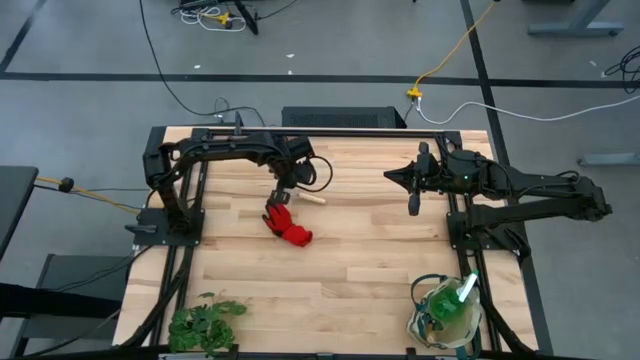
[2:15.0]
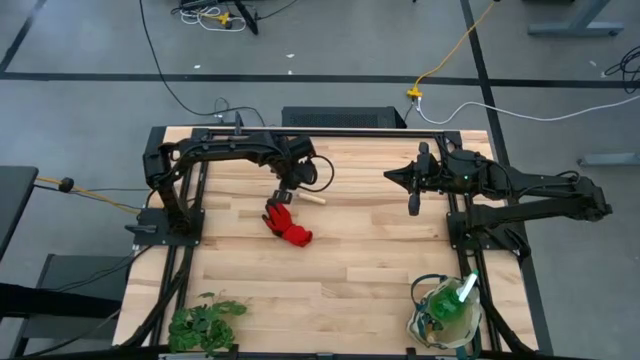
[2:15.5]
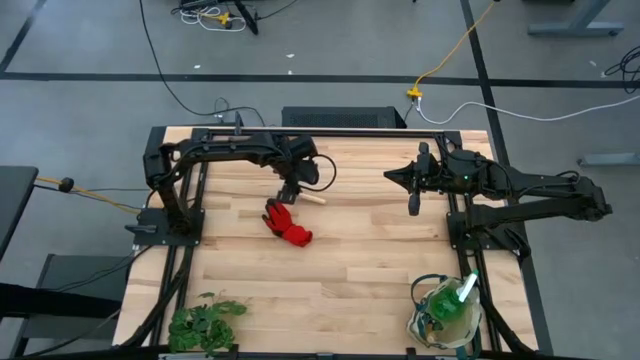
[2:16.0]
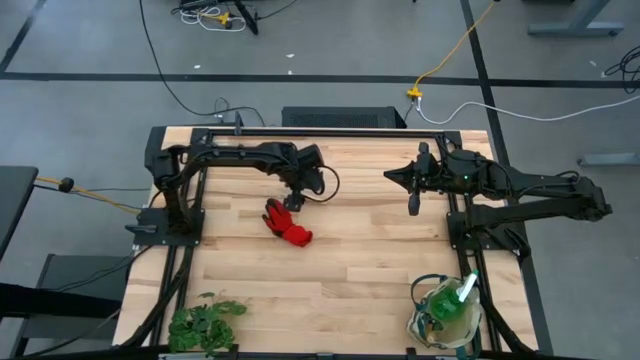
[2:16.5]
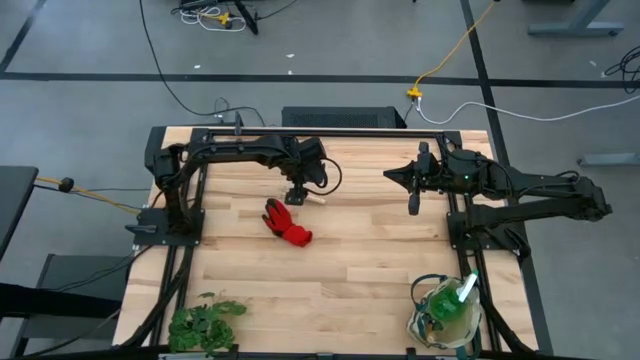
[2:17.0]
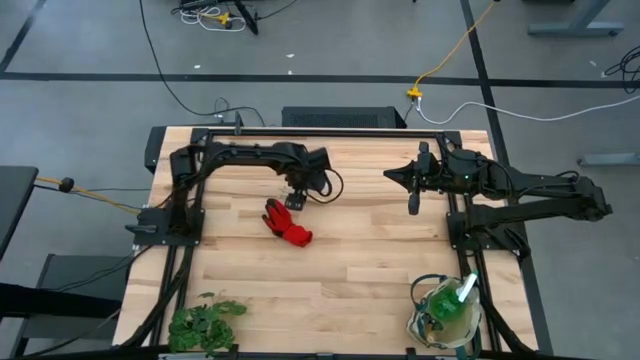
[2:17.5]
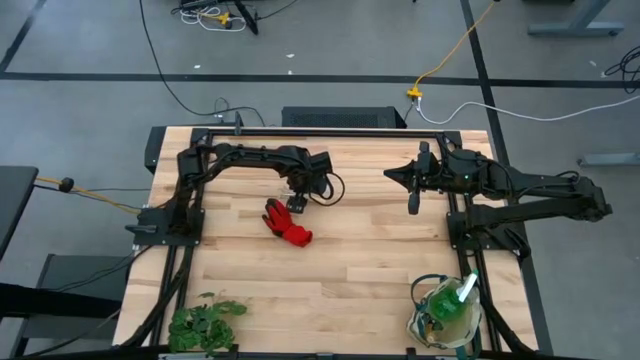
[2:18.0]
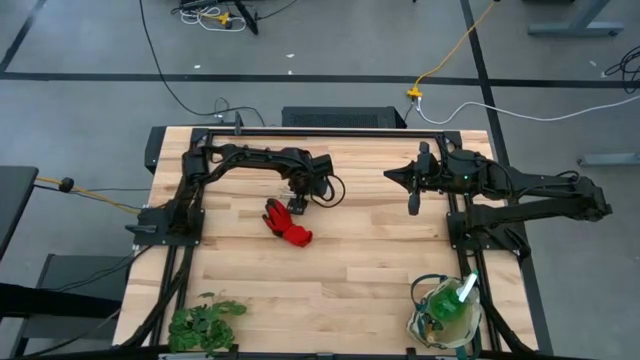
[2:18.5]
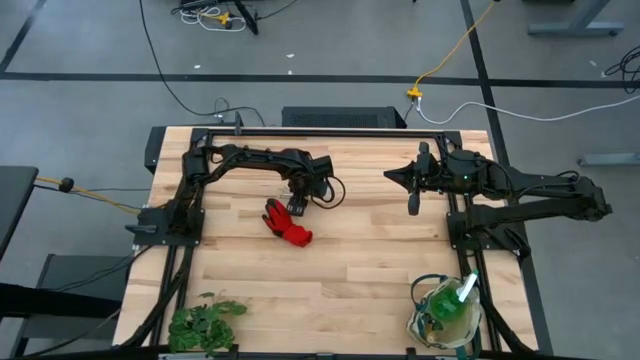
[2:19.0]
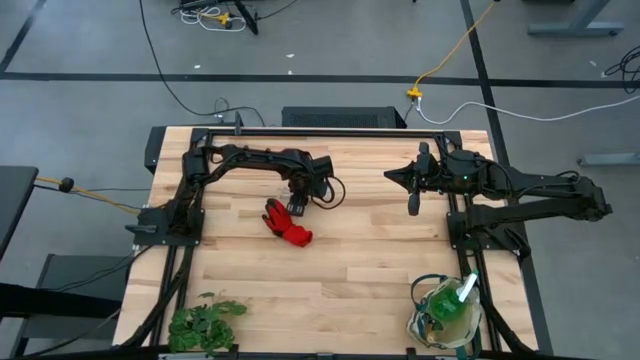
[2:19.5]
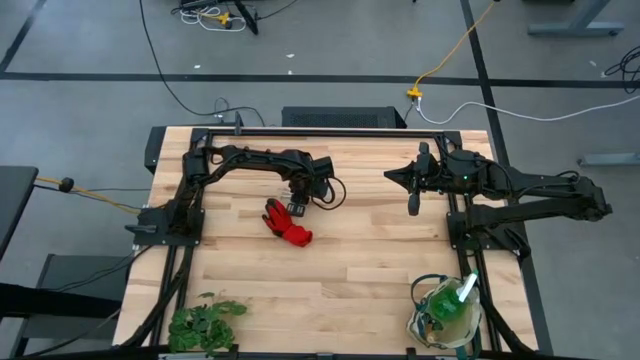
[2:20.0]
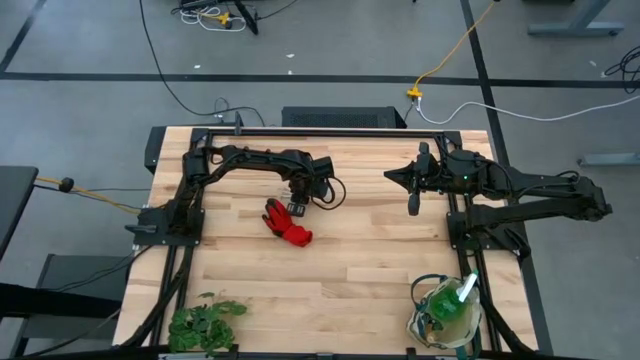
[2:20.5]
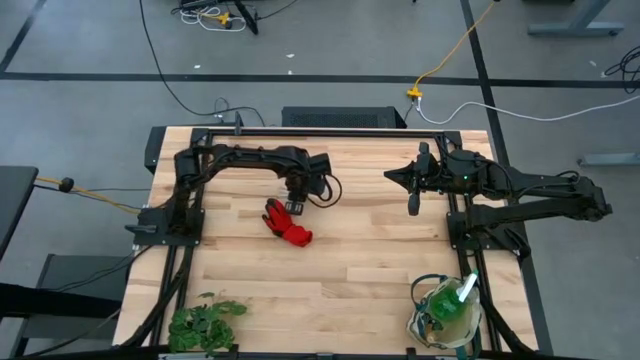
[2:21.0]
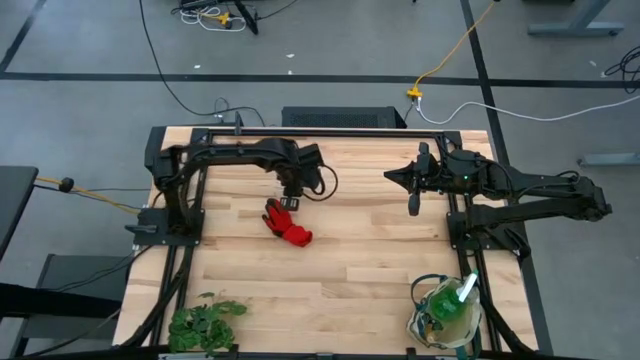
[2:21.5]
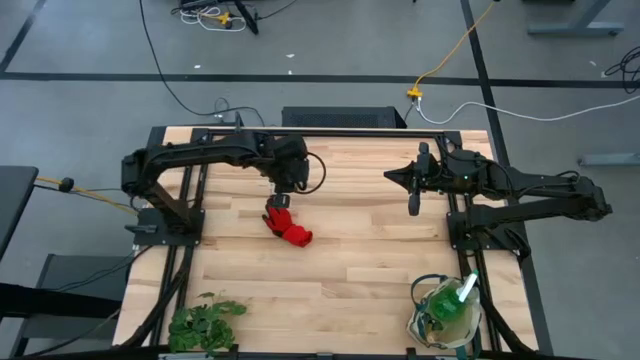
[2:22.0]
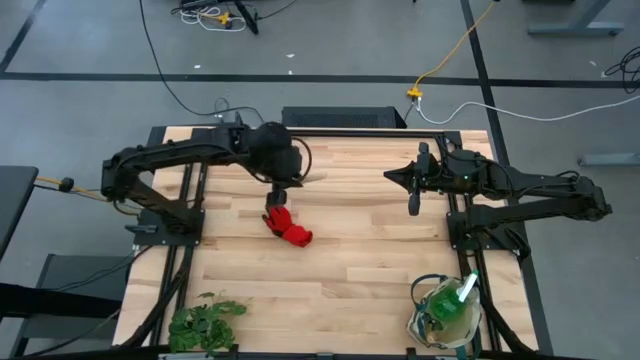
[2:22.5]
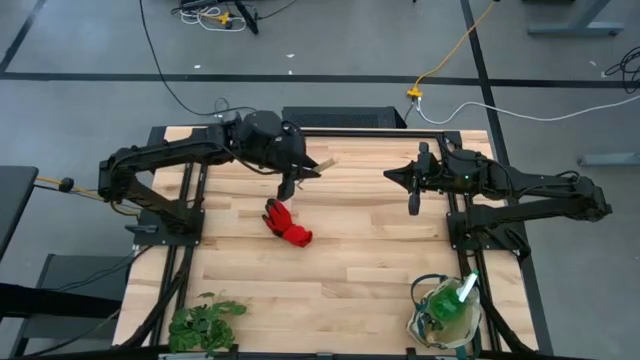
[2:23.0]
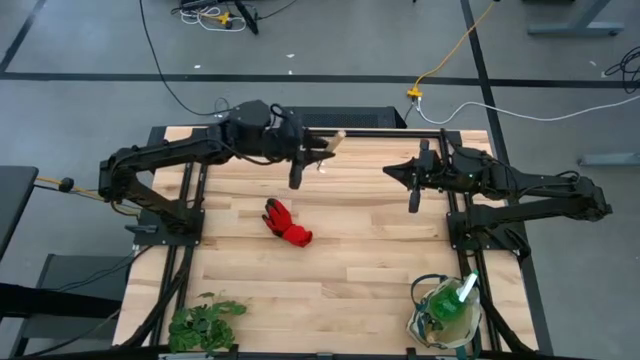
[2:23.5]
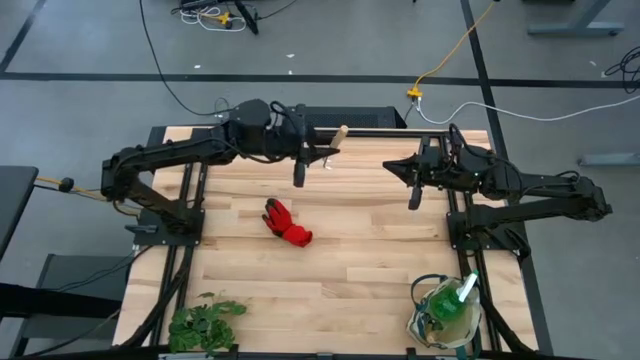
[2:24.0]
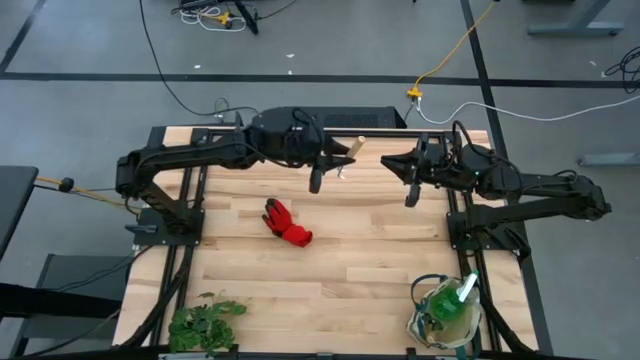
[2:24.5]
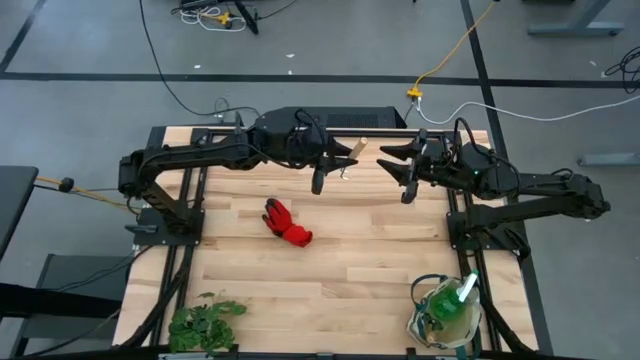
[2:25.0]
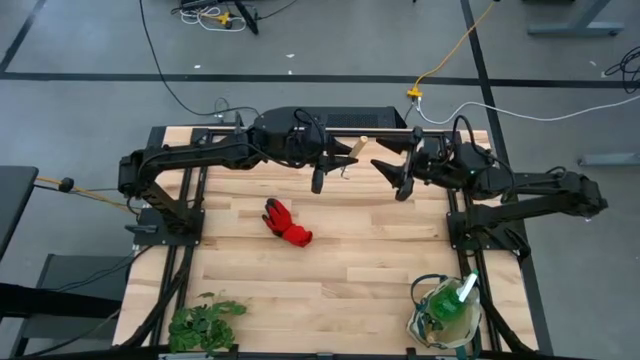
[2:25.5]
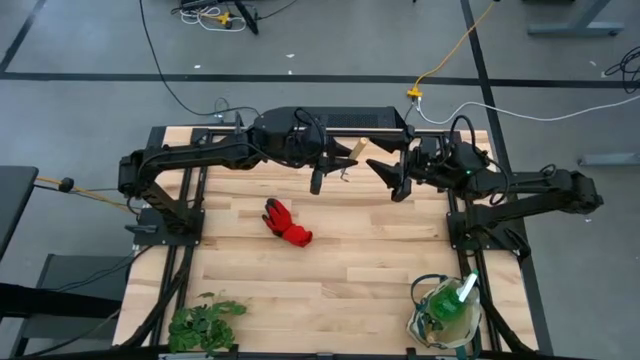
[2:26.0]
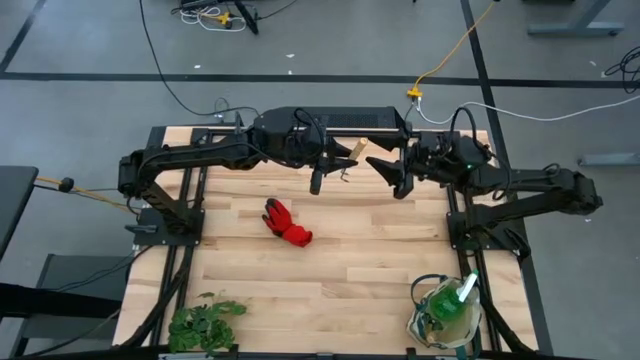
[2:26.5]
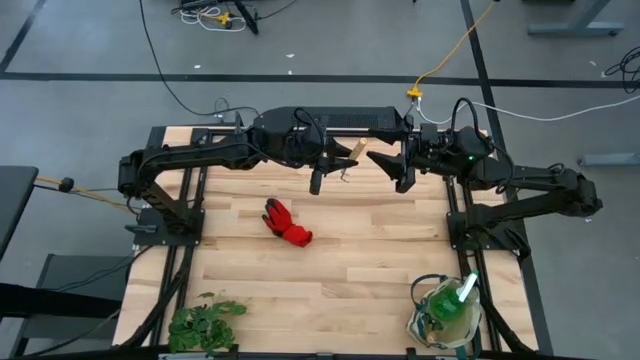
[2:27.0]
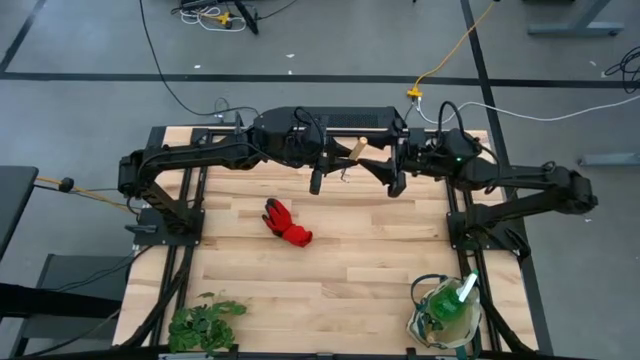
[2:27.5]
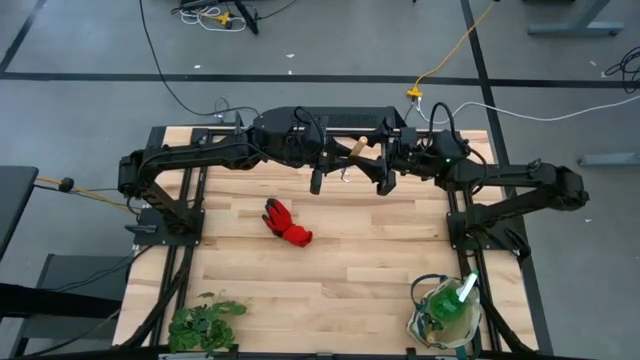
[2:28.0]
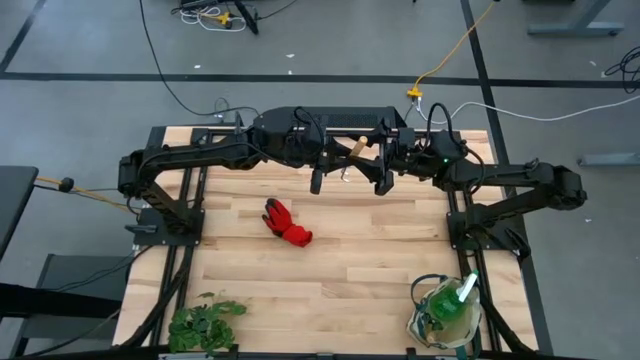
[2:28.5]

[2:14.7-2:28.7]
Task: Pick & Place Garden tools in Gardening bag
Put the hand rake into the gardening bag

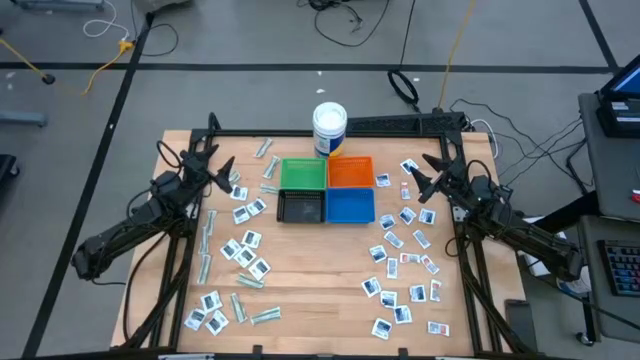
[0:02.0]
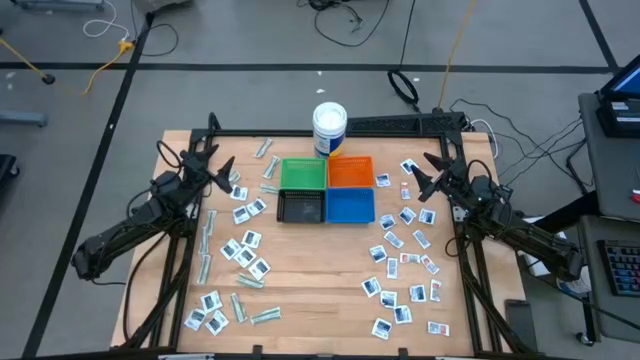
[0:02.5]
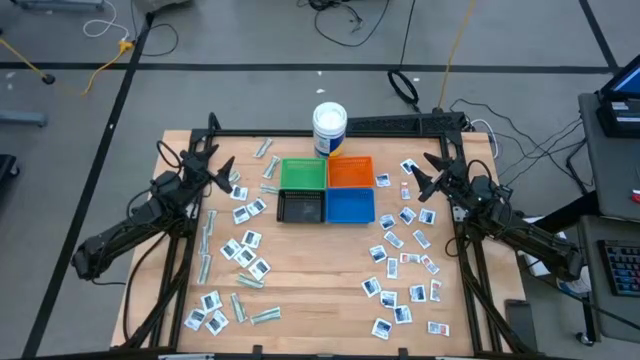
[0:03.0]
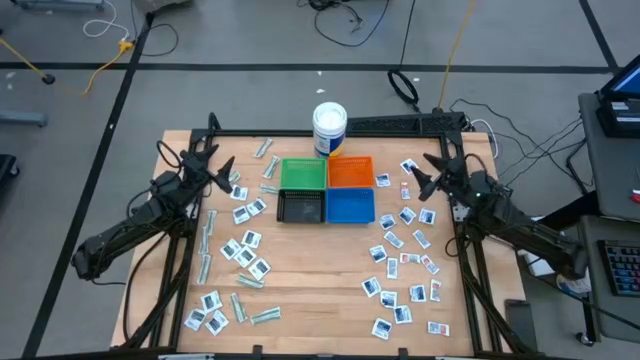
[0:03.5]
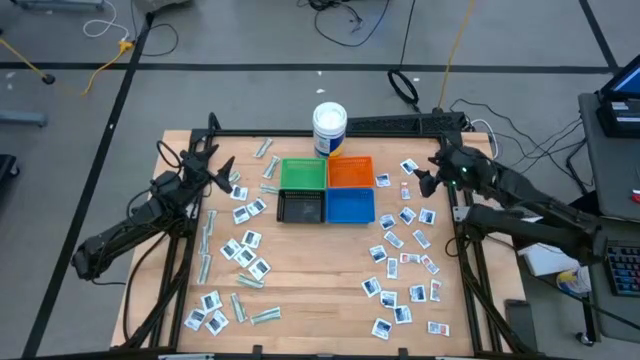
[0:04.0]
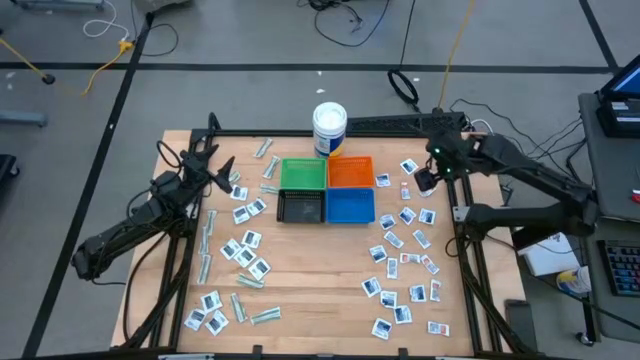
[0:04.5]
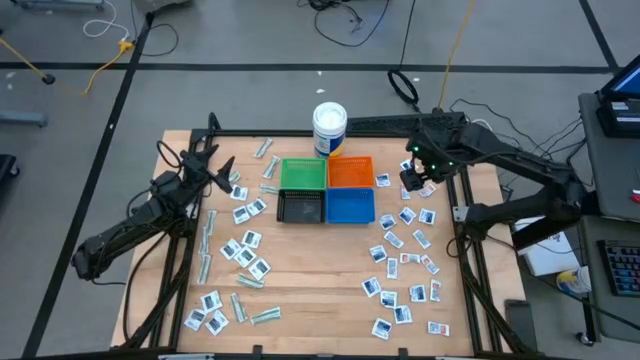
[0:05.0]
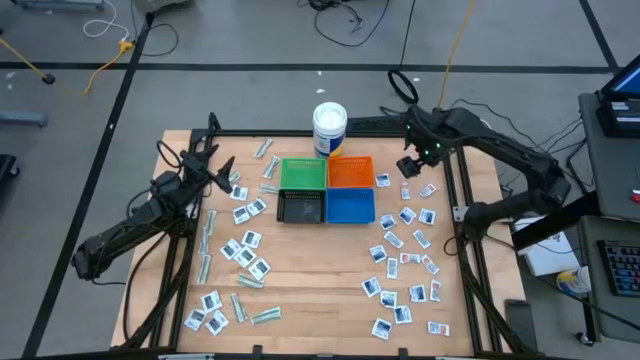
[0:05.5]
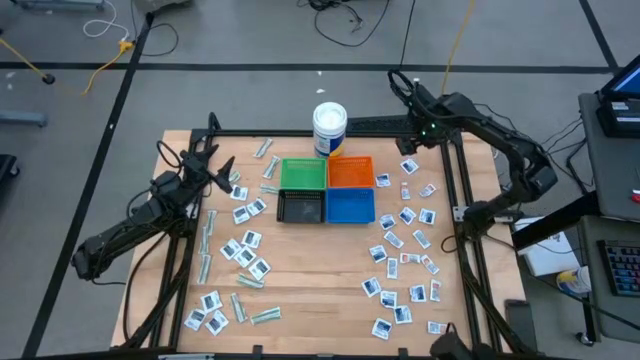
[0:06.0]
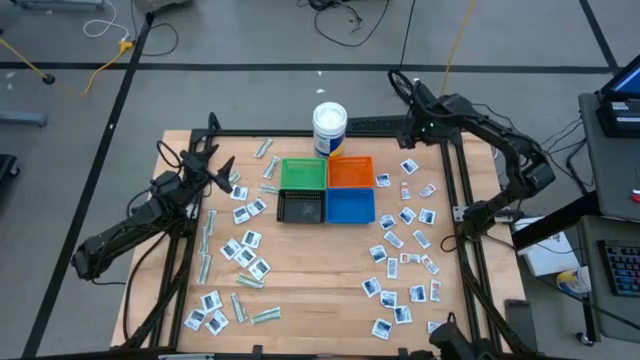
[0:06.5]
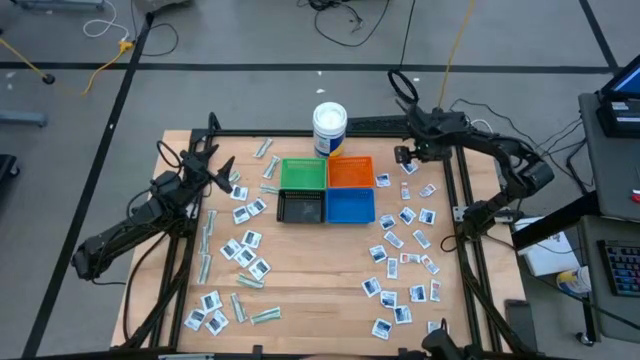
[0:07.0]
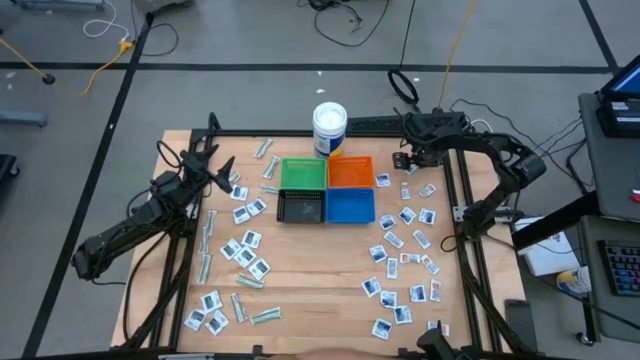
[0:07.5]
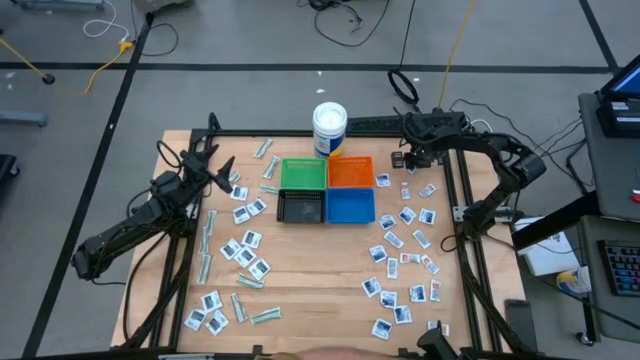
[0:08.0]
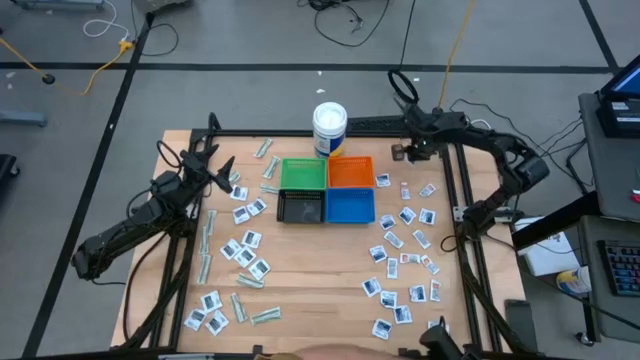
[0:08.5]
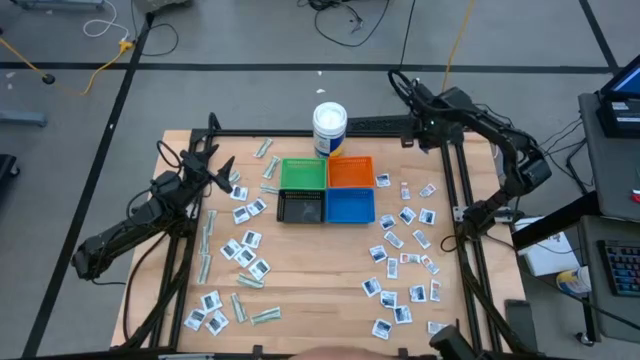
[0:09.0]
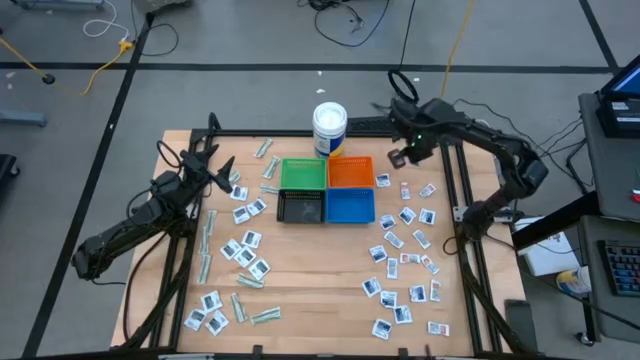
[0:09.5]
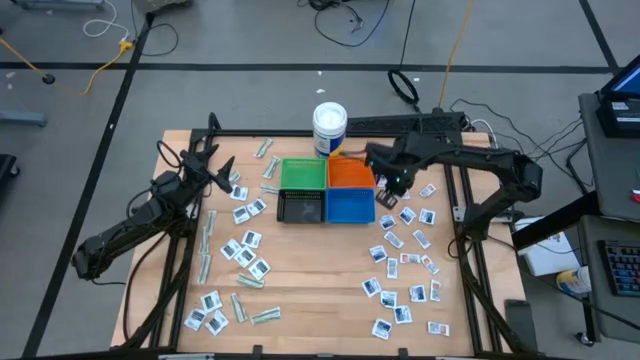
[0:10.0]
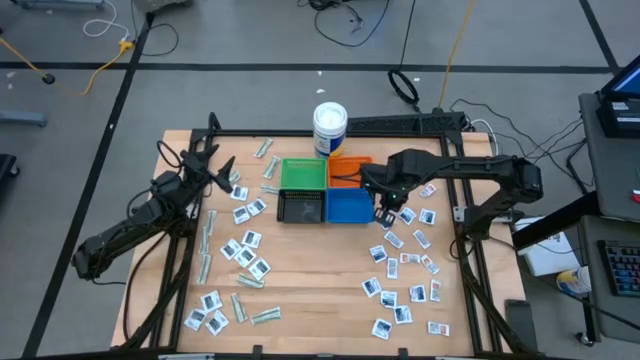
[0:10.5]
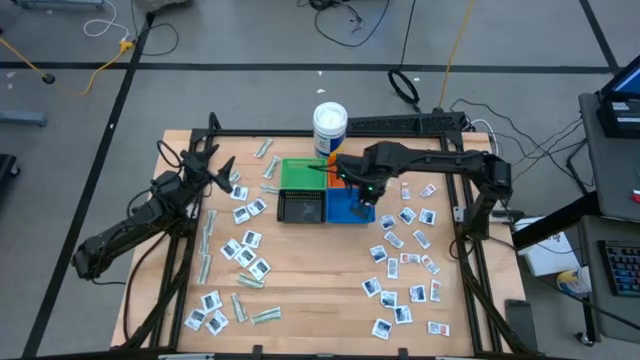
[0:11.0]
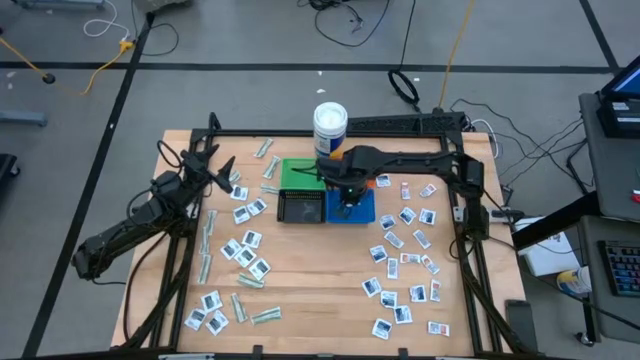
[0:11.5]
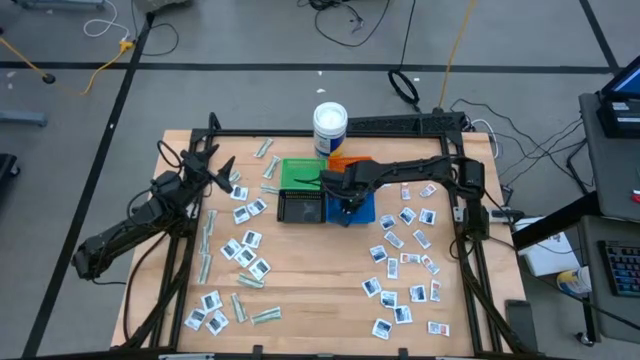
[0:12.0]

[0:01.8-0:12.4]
Task: Pick & Place First Aid Supplies
Put the blue alcohol pad into the blue basket
